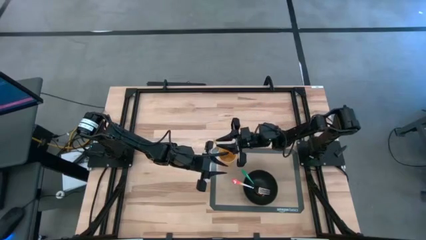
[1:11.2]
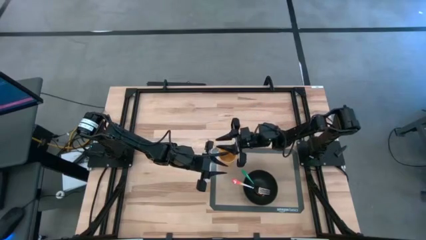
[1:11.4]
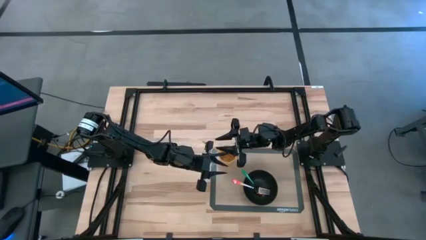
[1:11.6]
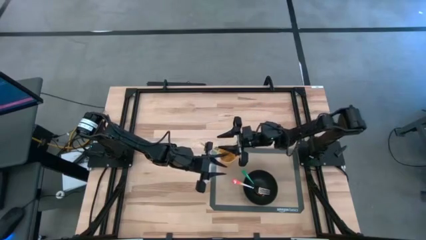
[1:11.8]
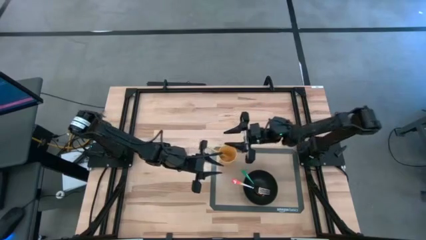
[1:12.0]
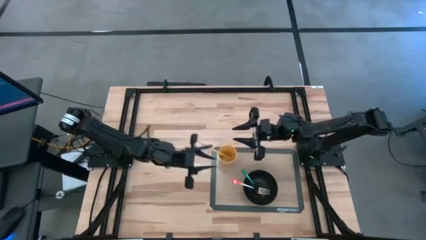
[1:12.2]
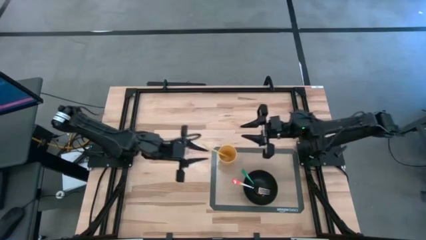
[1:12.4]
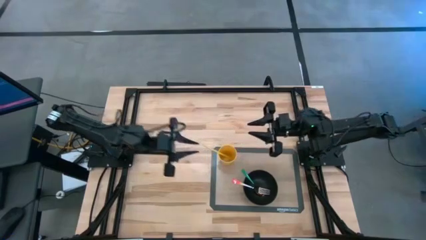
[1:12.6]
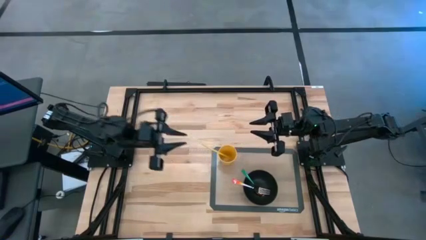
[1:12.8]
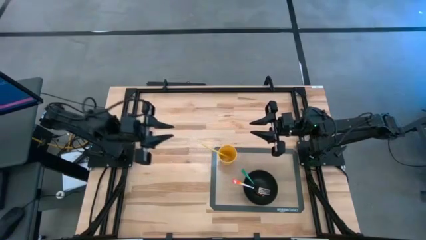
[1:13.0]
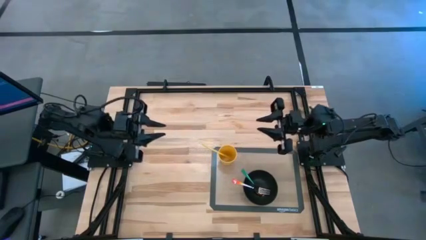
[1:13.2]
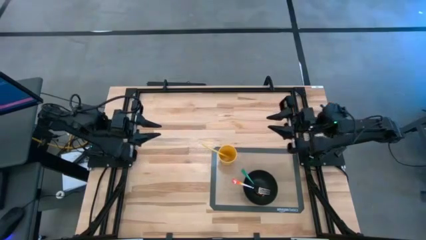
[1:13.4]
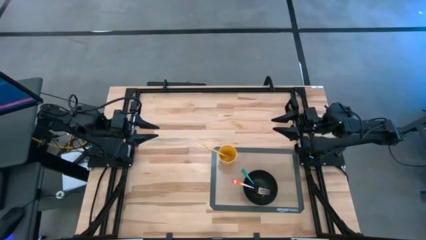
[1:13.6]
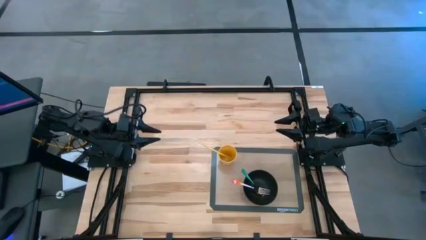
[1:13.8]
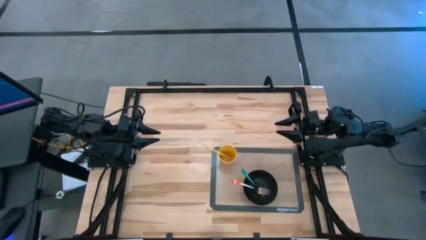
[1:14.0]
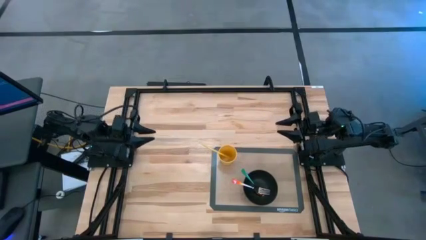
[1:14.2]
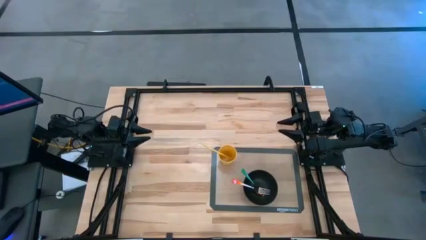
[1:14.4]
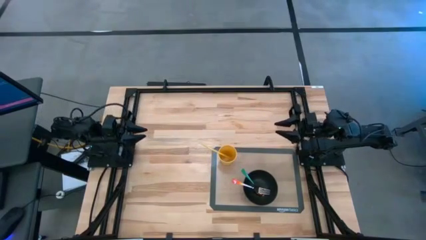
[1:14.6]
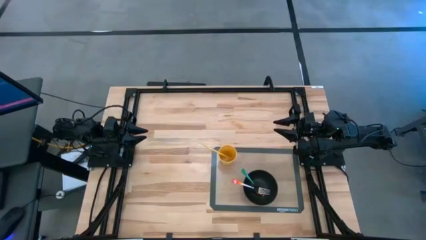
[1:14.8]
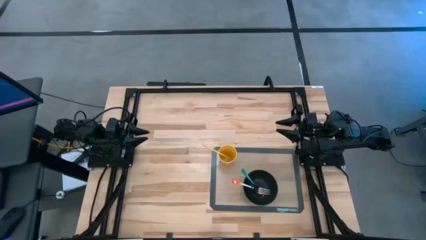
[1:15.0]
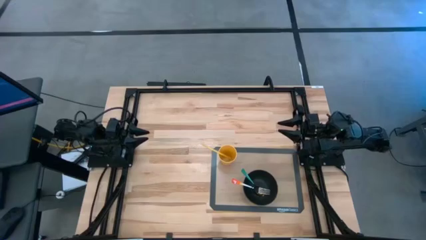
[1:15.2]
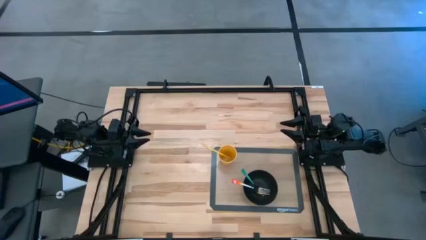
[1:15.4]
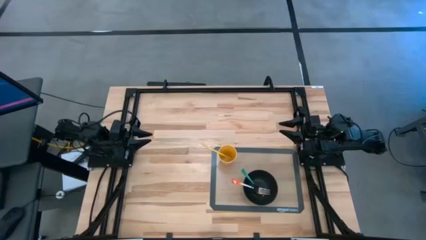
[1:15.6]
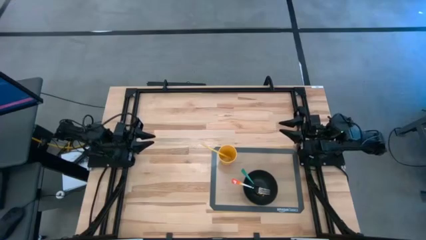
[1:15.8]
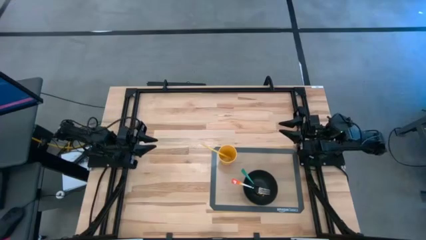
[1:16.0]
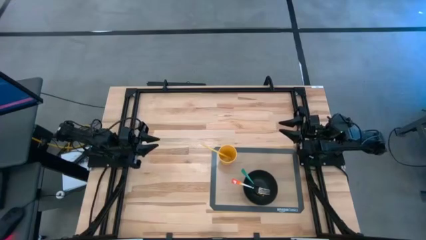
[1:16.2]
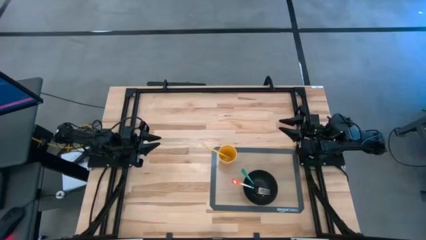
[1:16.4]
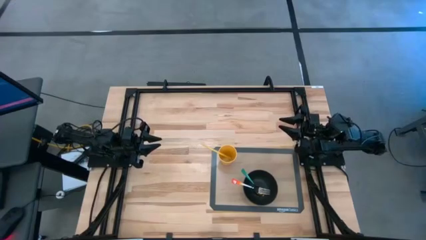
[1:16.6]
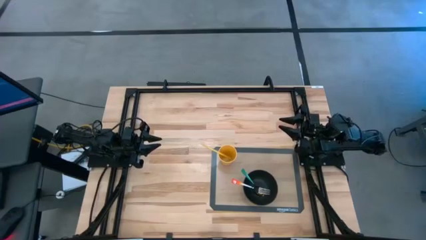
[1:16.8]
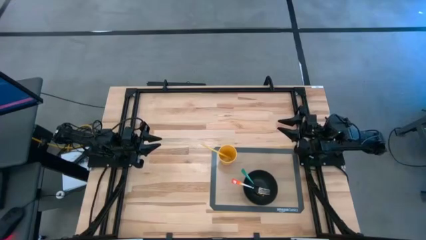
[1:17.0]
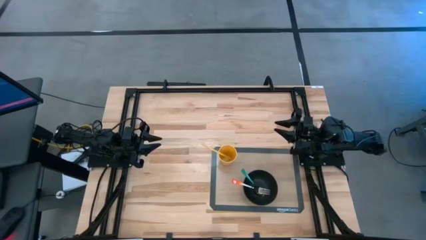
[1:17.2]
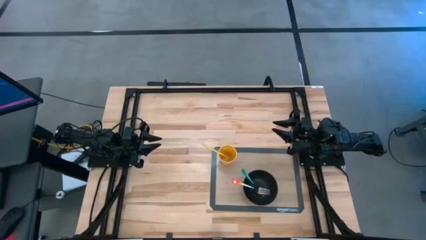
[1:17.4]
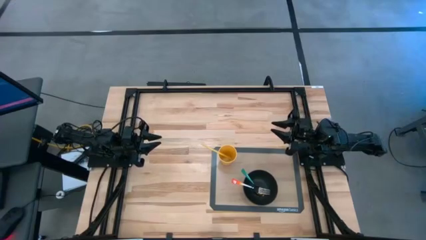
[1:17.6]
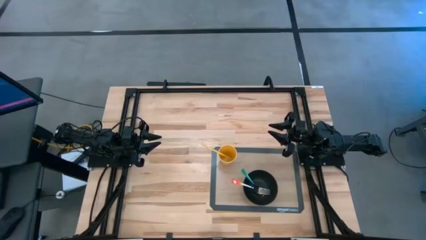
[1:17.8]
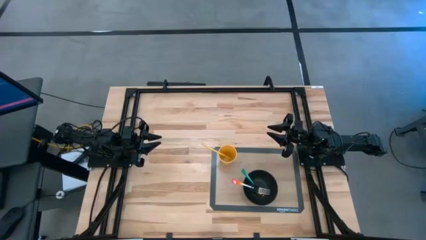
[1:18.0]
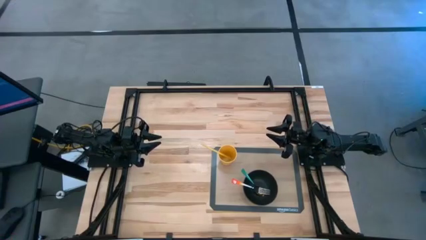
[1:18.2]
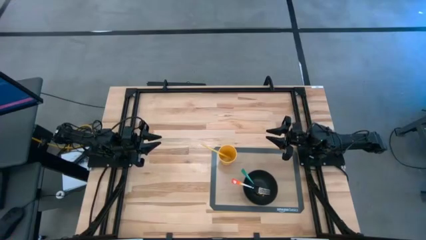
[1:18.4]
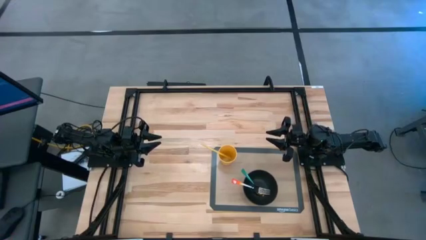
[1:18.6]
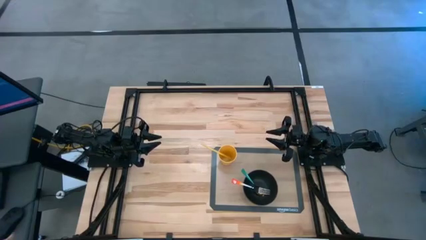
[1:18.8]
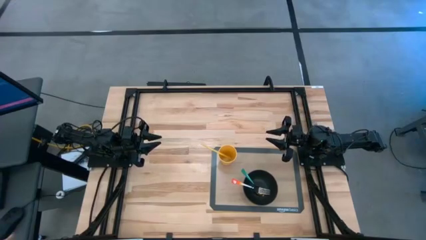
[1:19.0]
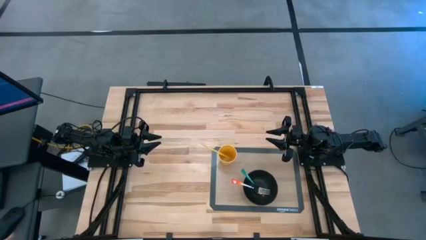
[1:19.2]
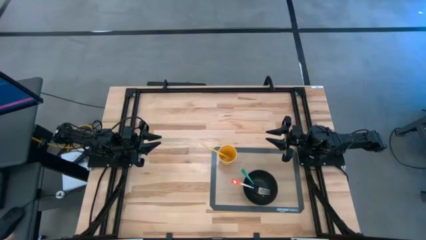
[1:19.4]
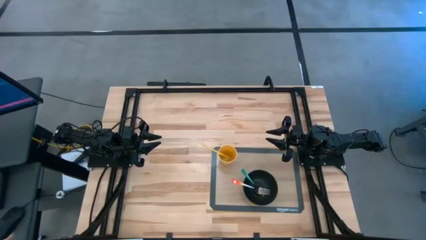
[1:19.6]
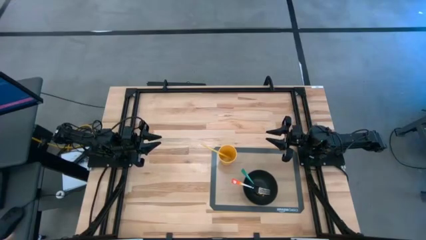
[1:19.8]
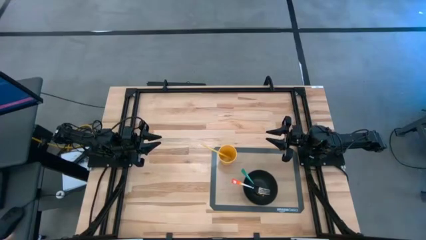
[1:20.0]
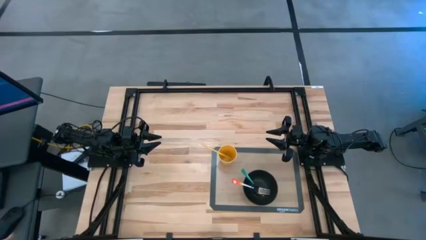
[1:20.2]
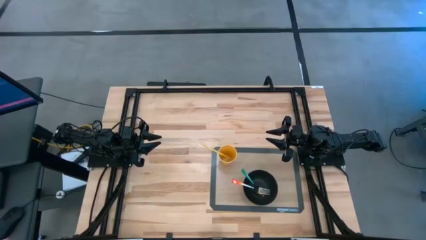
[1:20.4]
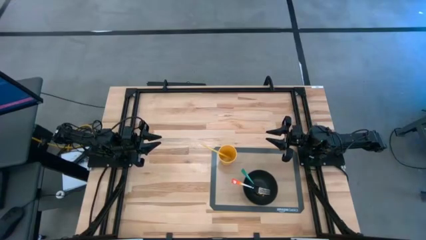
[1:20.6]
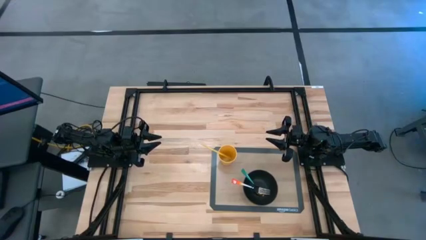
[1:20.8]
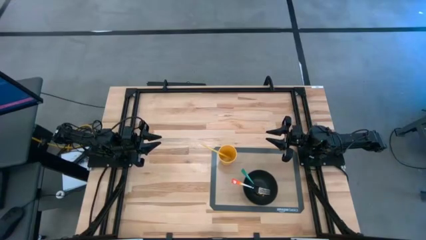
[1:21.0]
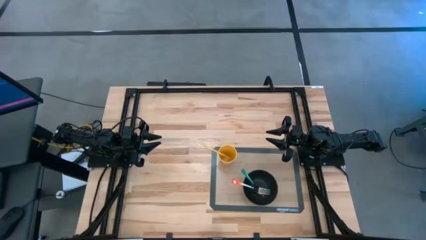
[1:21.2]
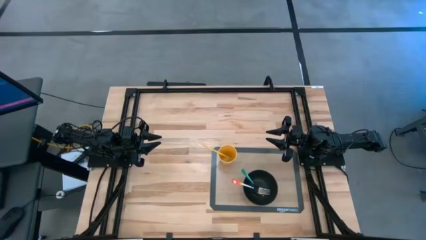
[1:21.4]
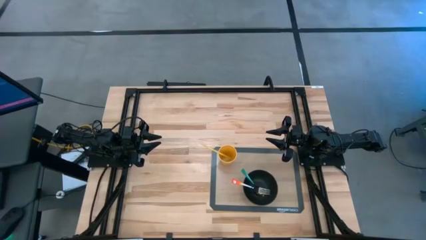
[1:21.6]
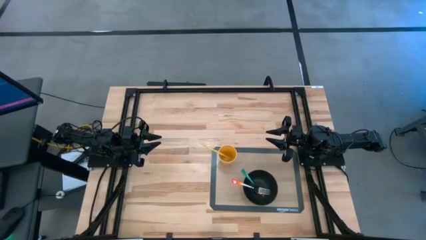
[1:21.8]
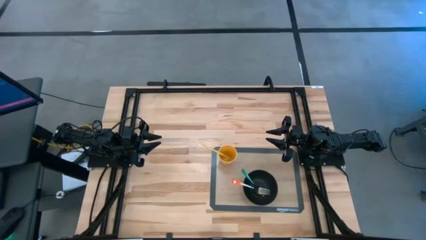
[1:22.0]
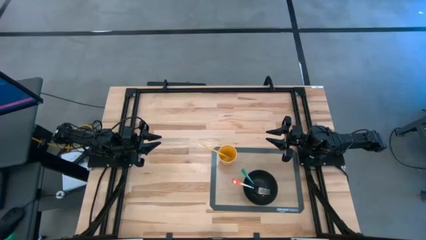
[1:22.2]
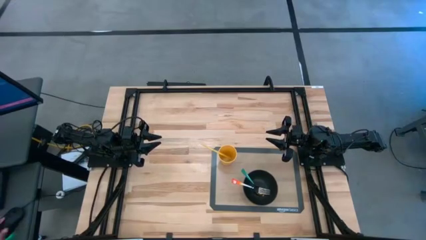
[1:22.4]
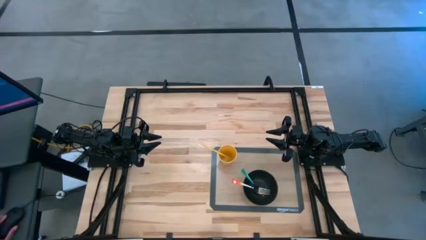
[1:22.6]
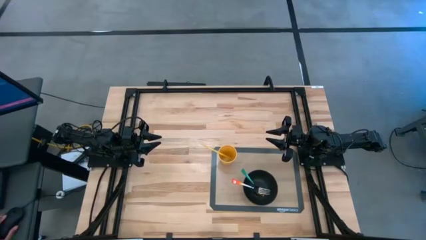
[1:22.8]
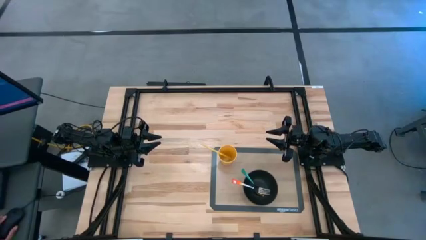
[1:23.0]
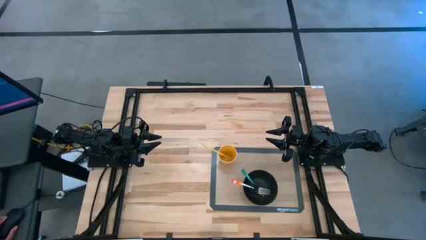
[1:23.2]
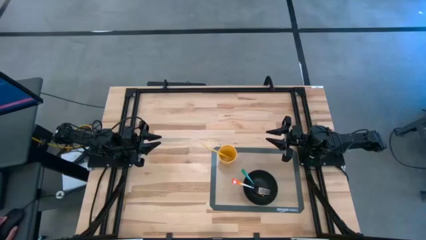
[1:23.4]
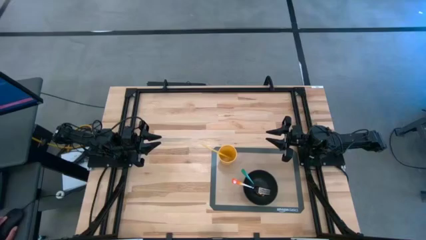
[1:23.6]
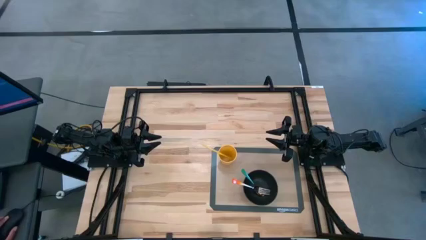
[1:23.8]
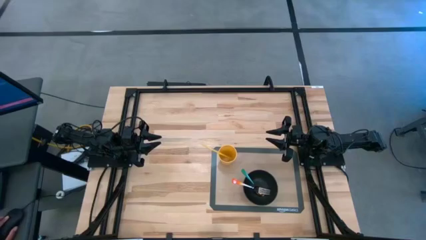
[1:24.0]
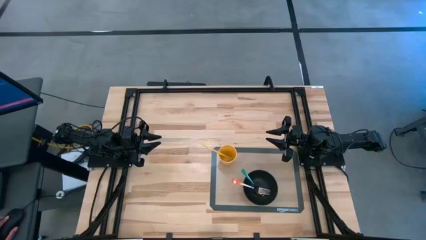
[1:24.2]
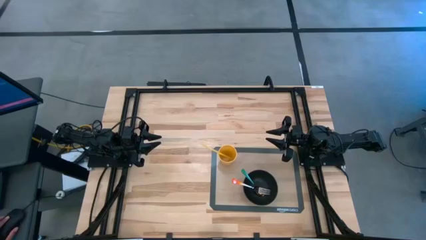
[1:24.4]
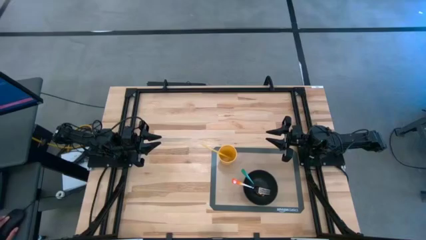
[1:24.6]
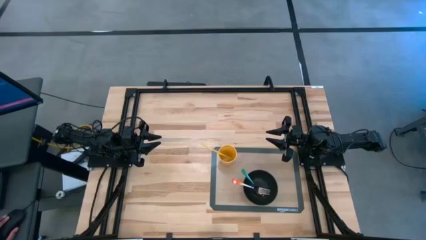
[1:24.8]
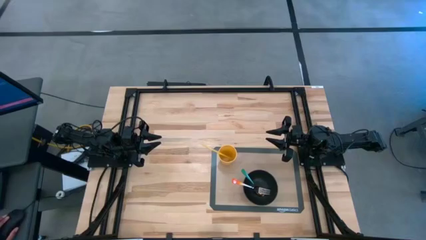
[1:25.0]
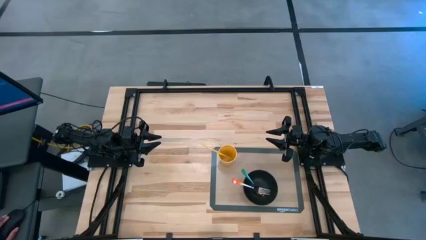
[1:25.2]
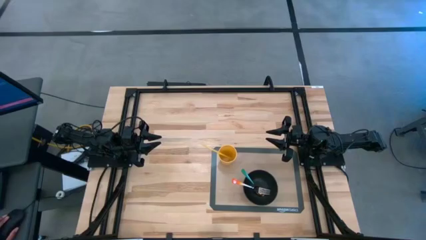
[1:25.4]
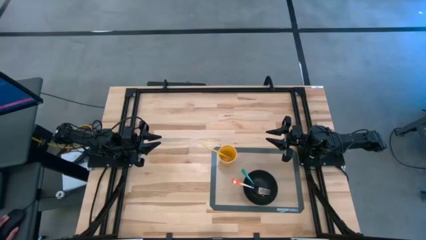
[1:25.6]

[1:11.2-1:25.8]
Task: Pick & Place Utensil
Return to Home Position

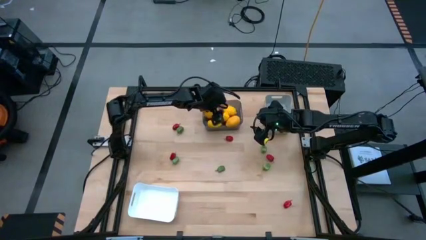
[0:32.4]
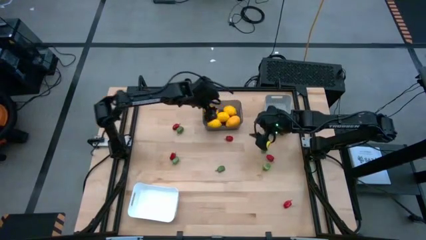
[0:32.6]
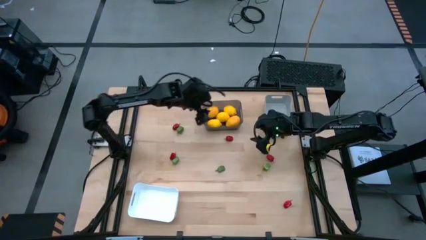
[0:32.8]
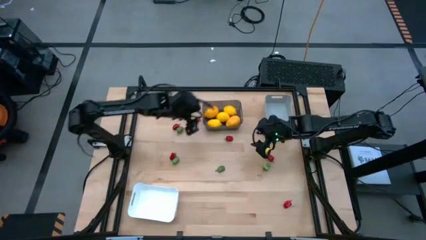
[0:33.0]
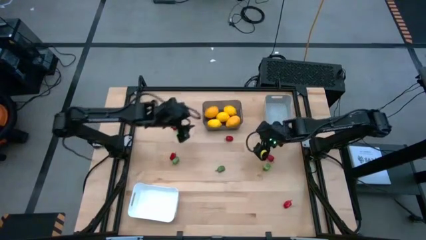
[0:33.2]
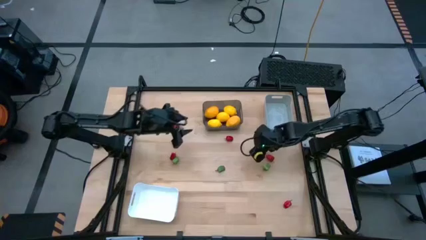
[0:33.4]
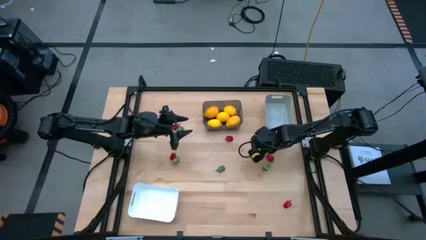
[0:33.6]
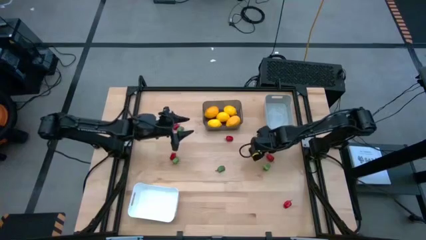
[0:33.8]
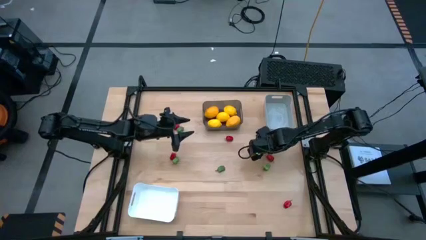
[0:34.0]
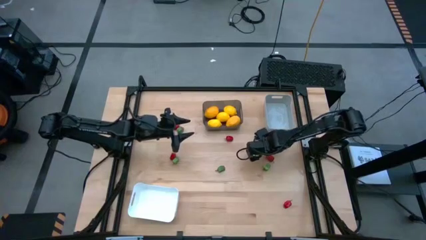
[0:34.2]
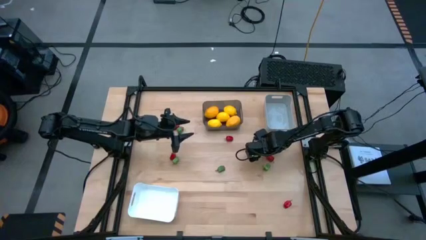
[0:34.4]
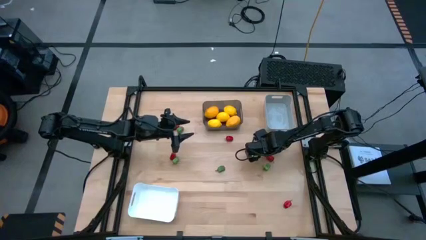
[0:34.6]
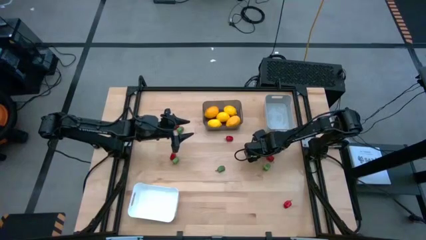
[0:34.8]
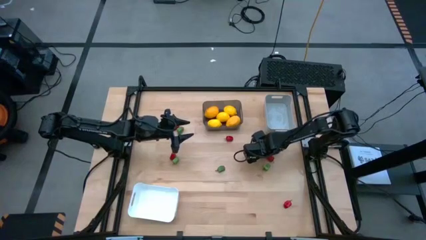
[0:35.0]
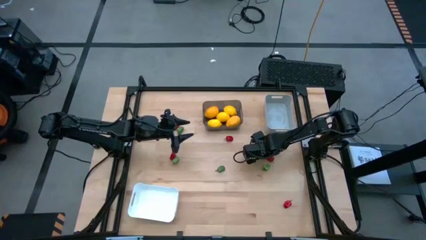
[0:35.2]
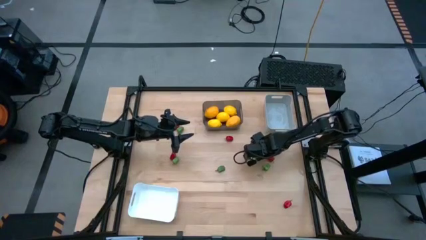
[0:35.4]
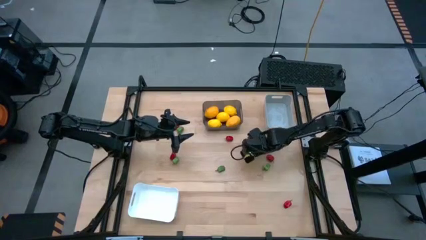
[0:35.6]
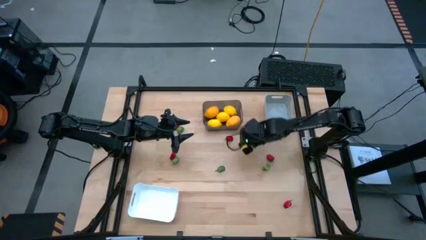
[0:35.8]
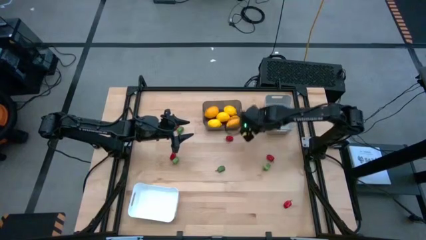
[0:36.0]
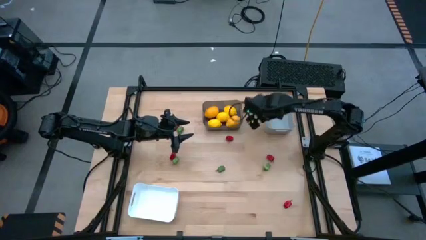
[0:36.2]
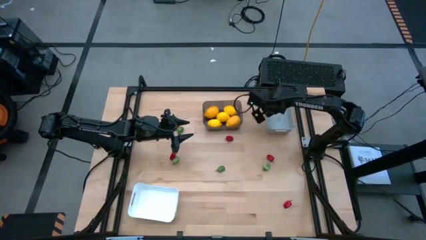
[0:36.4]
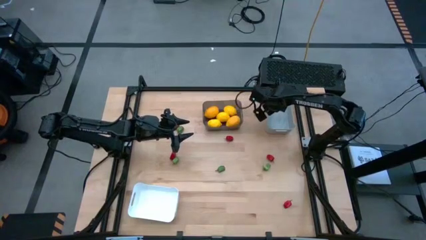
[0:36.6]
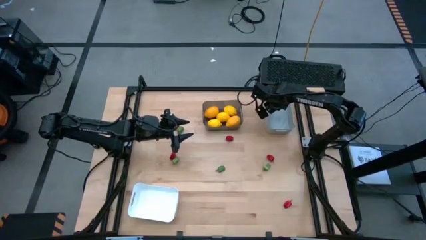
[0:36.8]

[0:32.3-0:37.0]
Task: Sort produce into baskets
Put the green pepper into the gray bin
